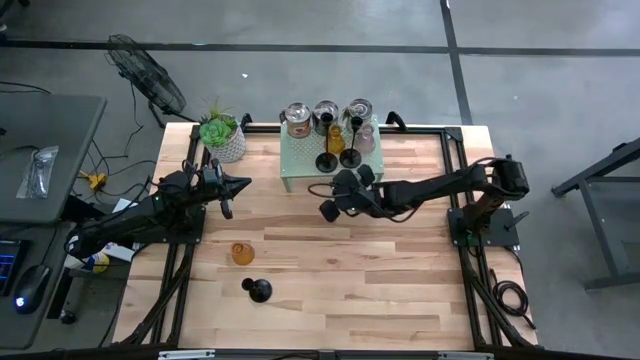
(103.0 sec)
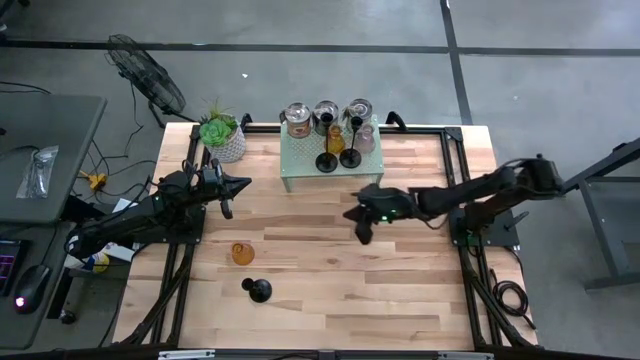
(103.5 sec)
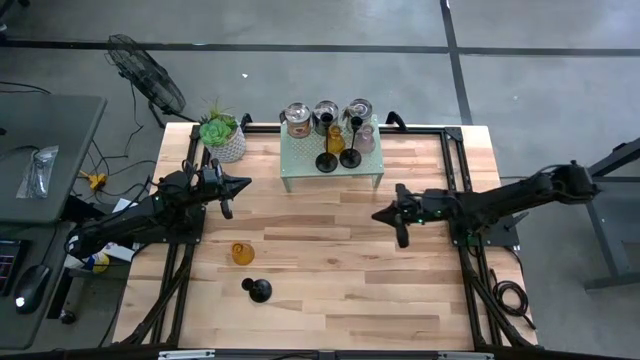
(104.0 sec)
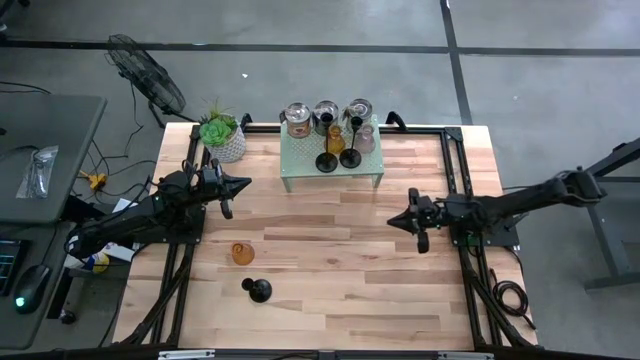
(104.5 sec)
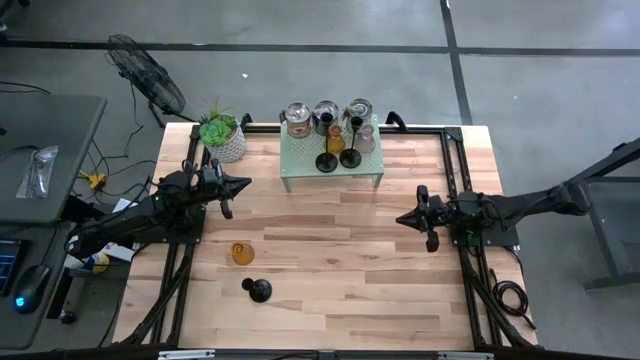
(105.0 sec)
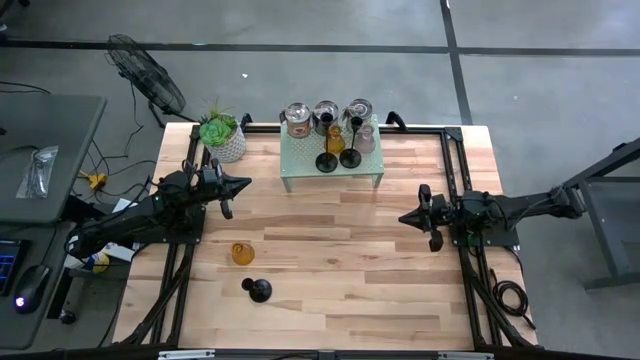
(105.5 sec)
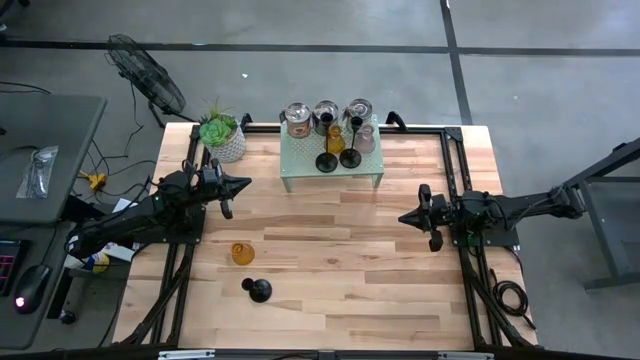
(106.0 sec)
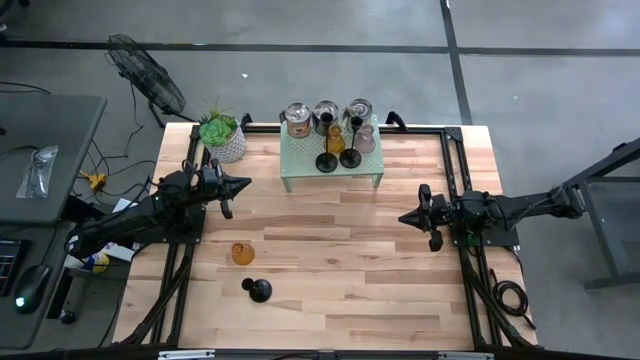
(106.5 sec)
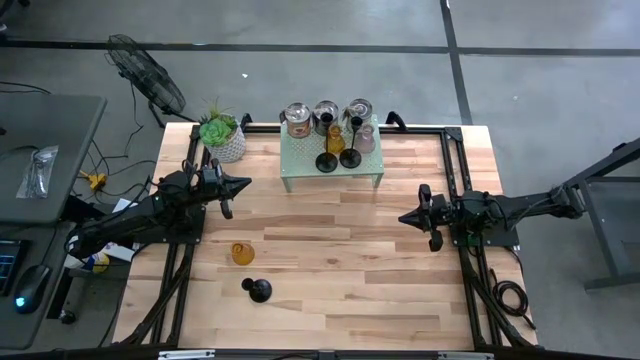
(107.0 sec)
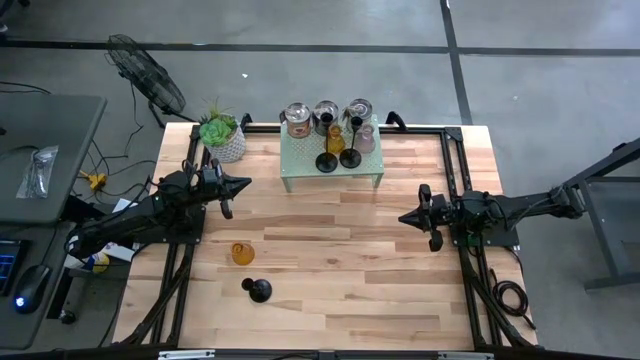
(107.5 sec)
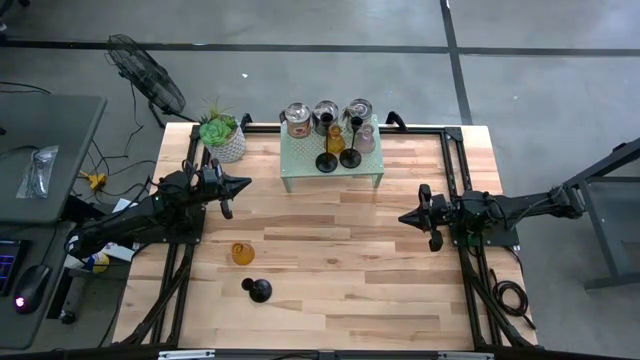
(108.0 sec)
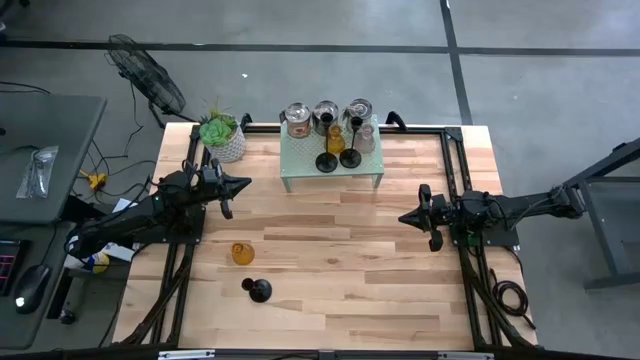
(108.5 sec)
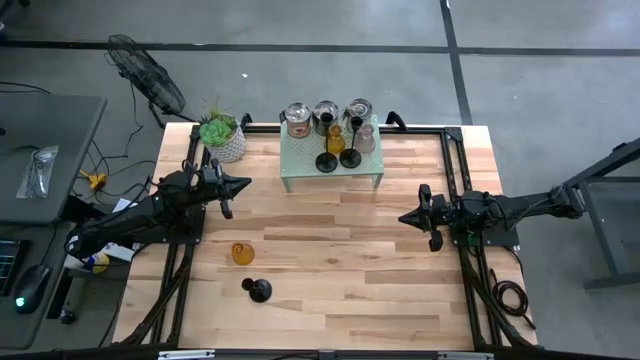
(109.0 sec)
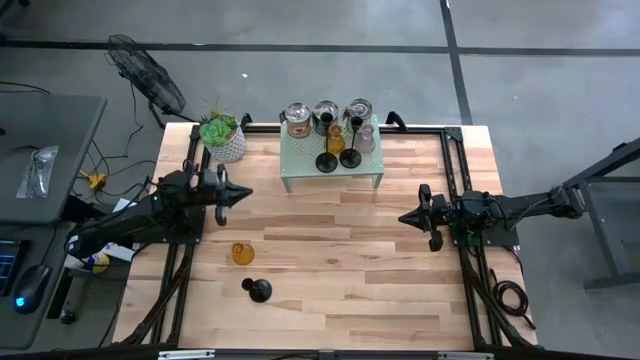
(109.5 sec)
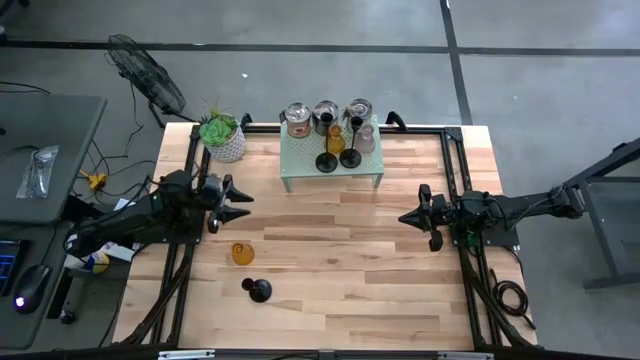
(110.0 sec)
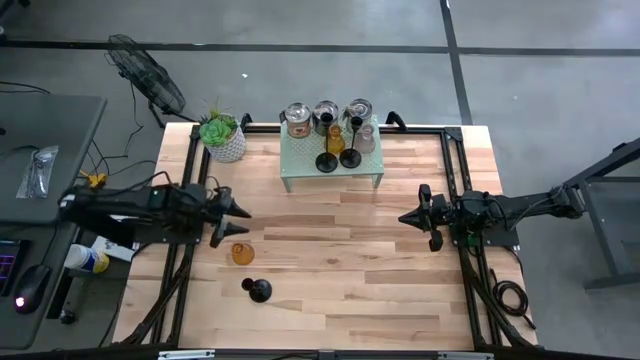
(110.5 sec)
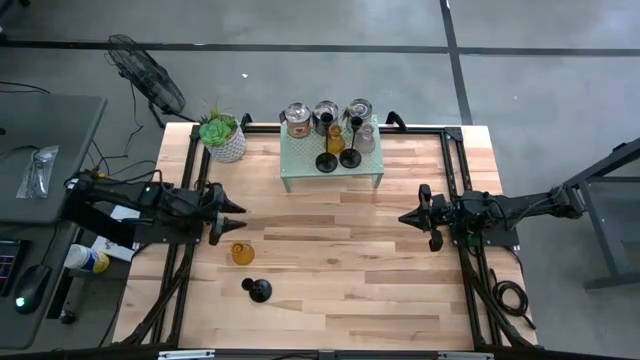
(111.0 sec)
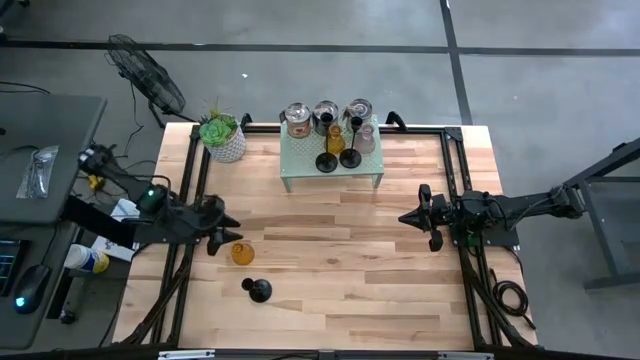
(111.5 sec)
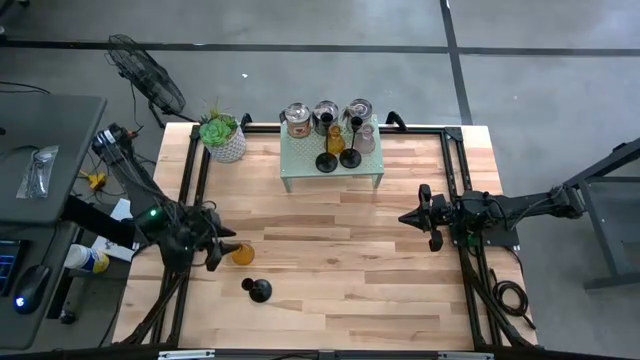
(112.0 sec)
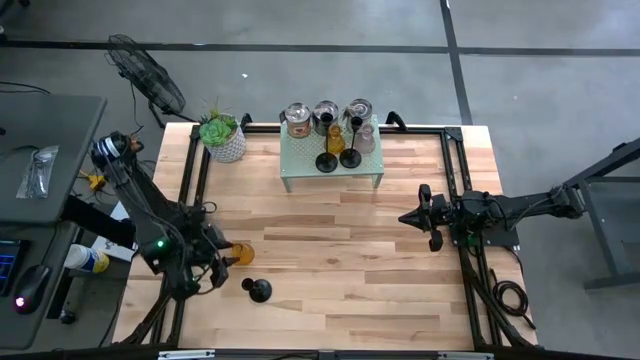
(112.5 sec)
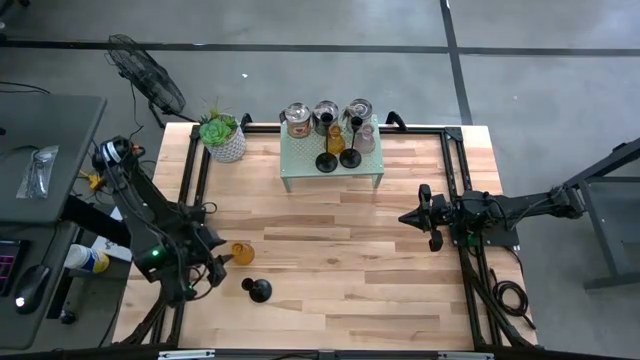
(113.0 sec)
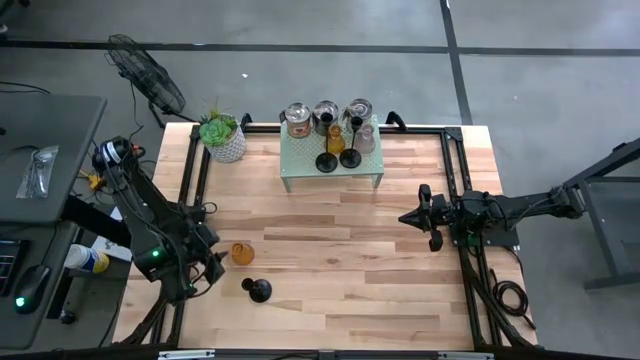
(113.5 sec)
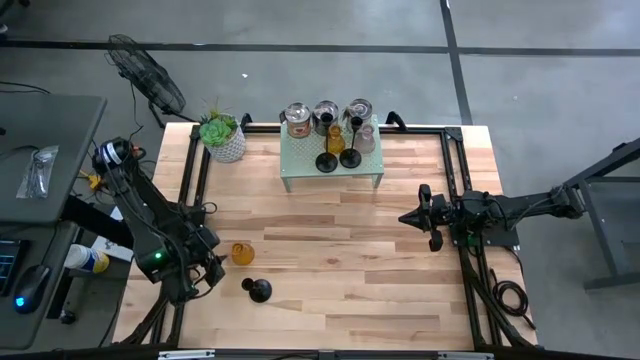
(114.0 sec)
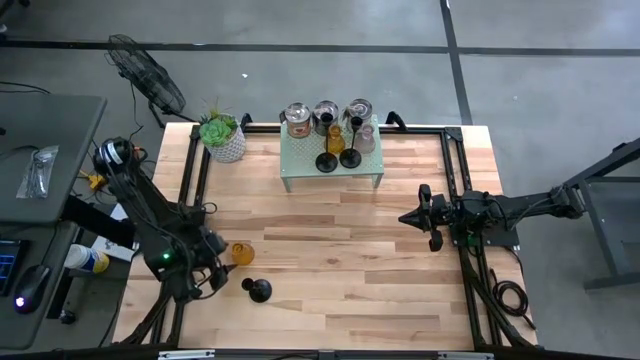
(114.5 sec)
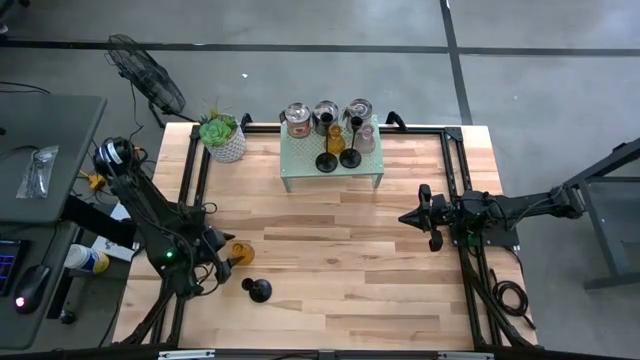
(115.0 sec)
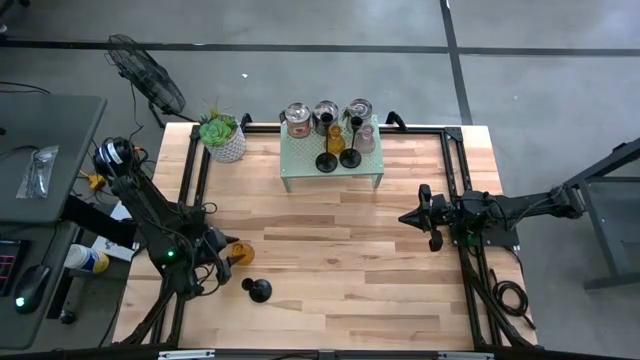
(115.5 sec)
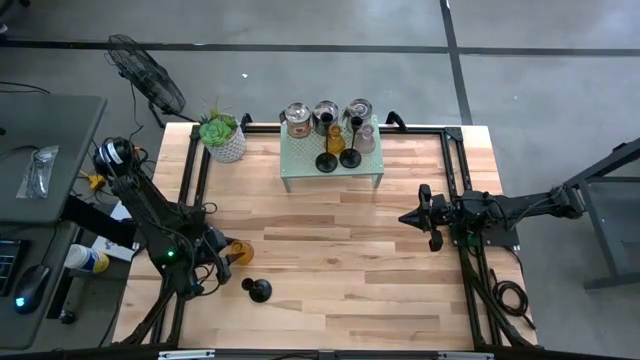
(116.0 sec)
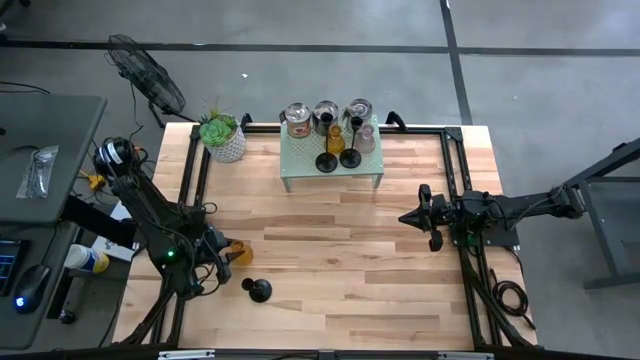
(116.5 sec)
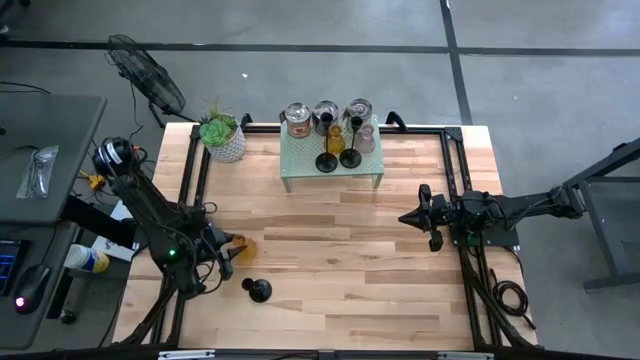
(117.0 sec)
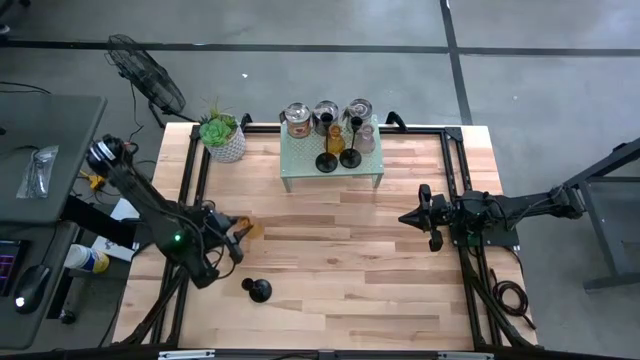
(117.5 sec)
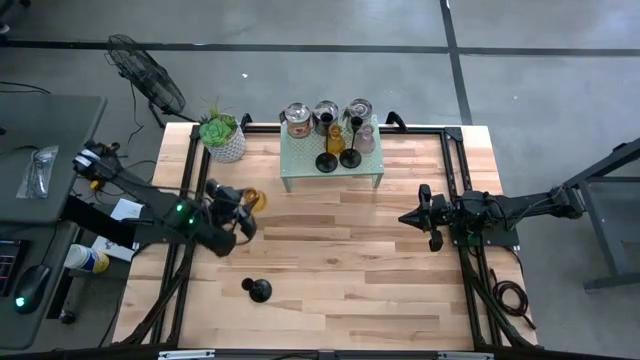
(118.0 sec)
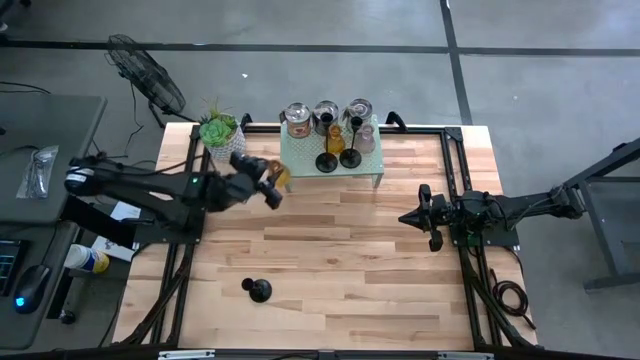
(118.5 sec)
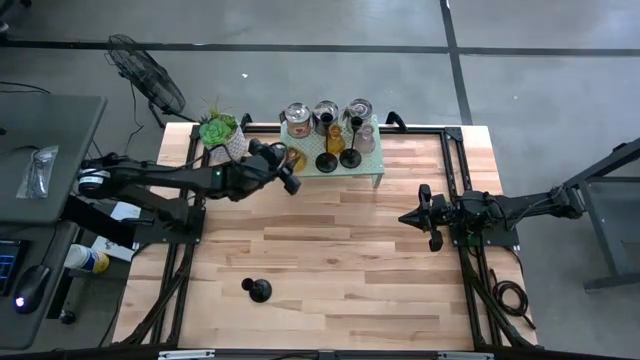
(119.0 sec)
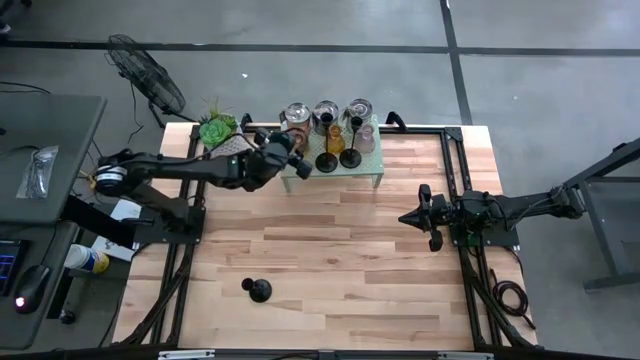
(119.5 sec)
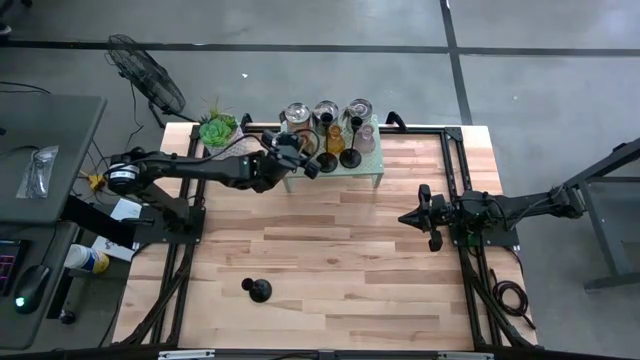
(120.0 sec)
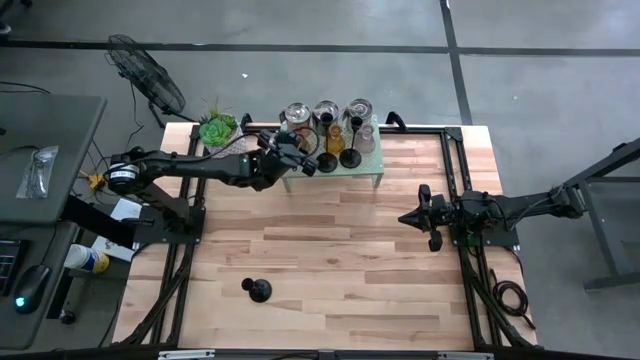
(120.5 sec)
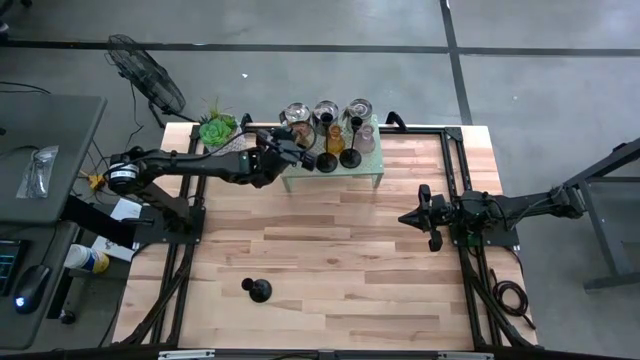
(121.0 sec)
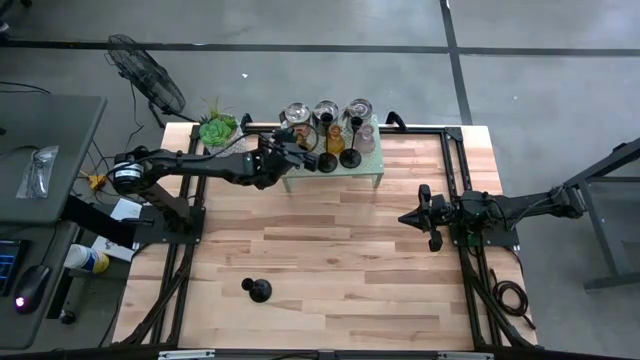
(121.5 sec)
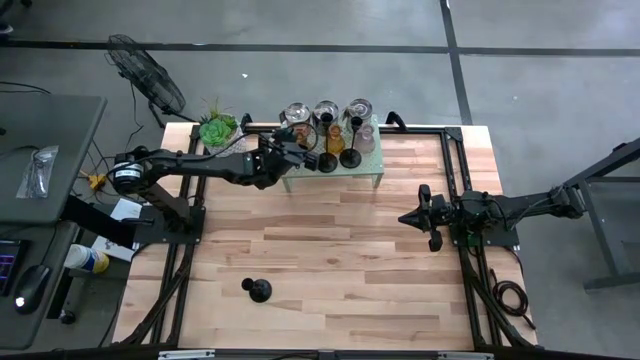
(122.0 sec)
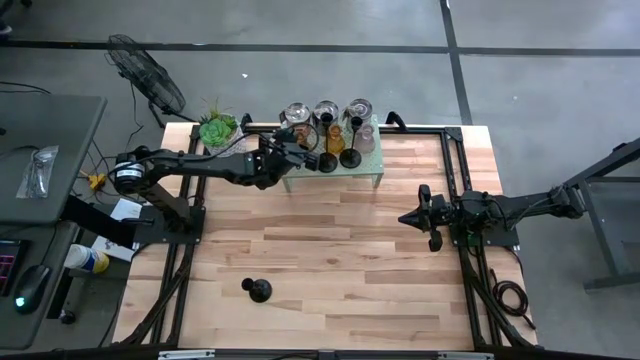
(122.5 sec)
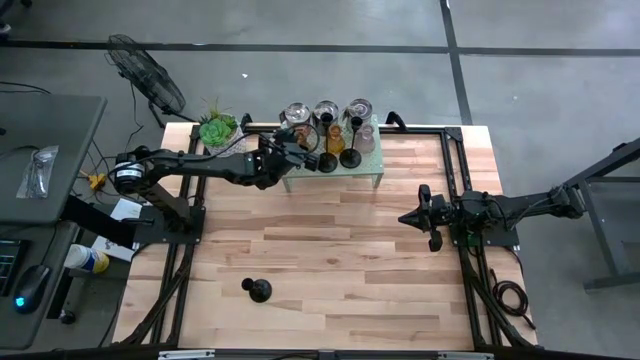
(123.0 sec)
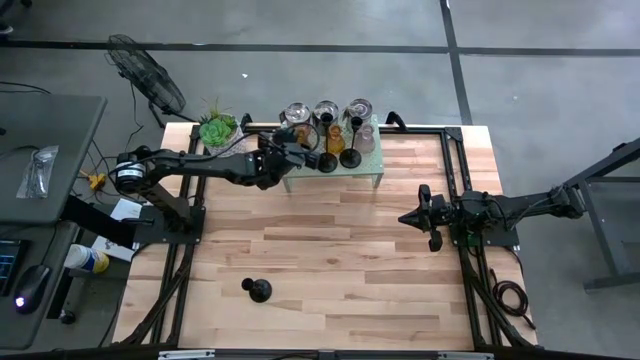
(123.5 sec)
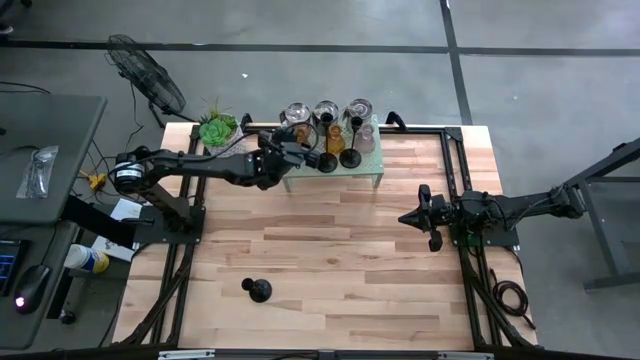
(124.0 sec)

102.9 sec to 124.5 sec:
Task: Pick & Place candle stick holders
Put the orange glass candle holder on the shelf
